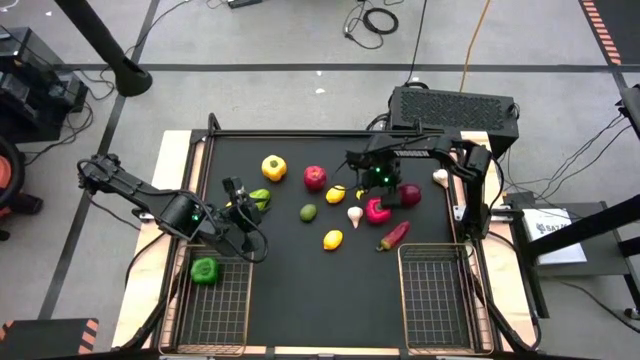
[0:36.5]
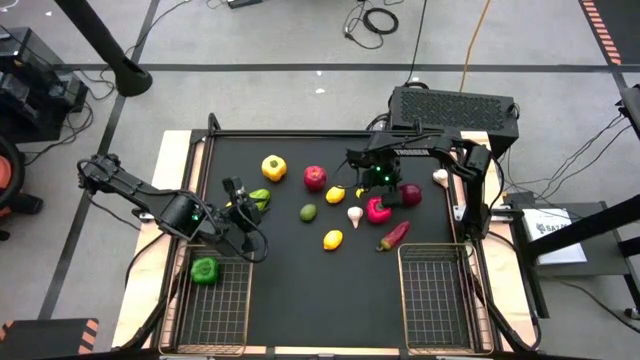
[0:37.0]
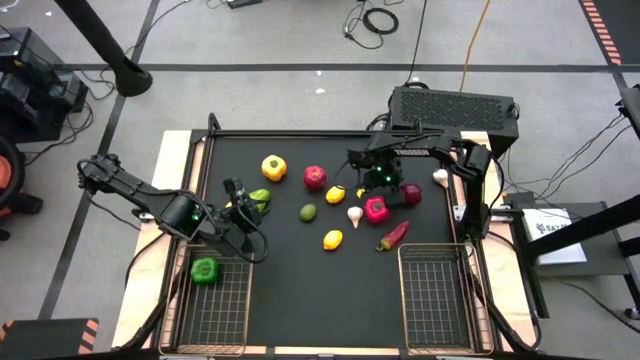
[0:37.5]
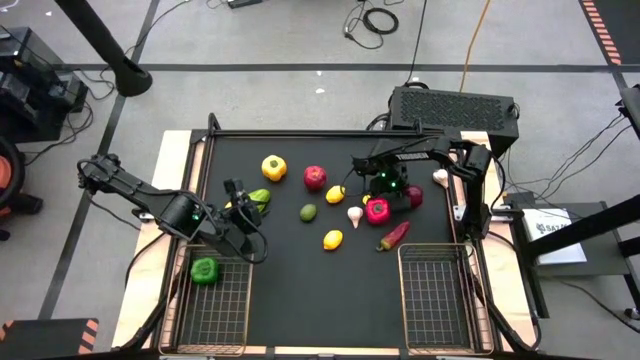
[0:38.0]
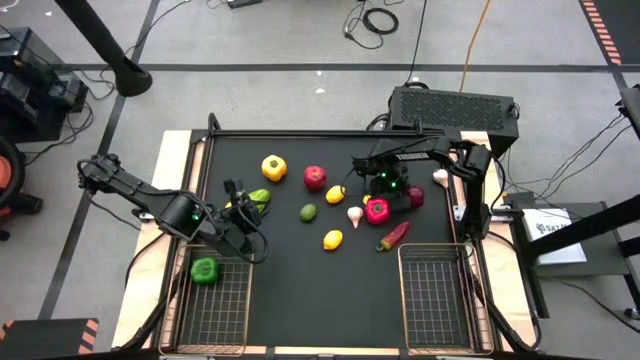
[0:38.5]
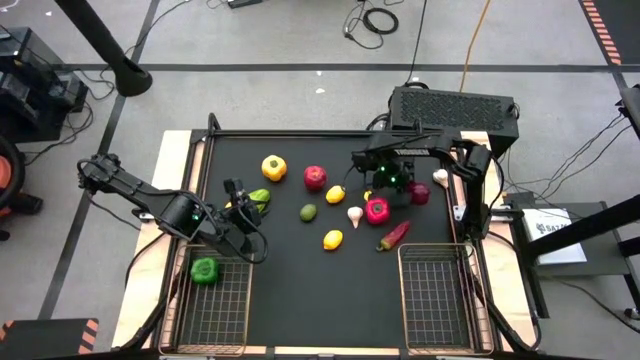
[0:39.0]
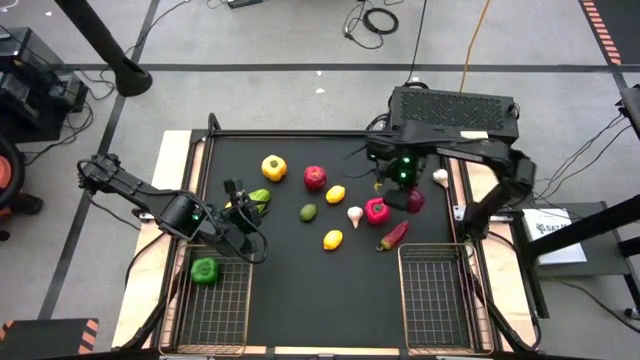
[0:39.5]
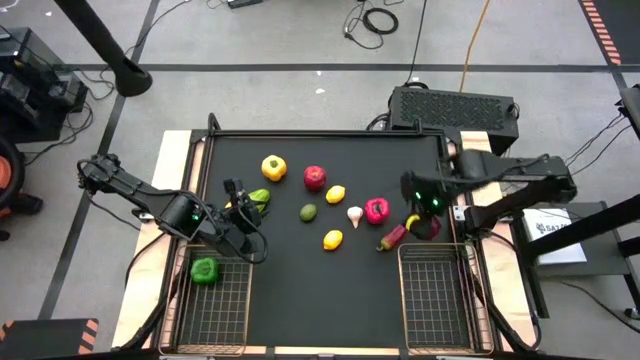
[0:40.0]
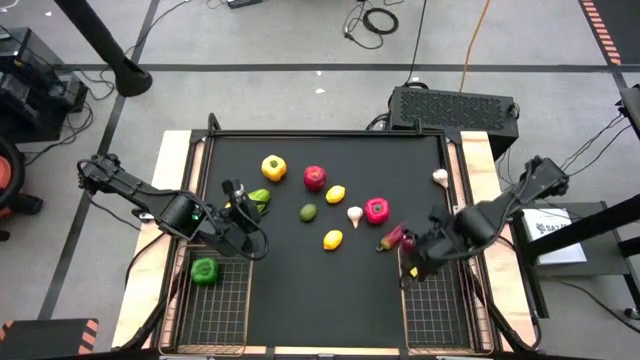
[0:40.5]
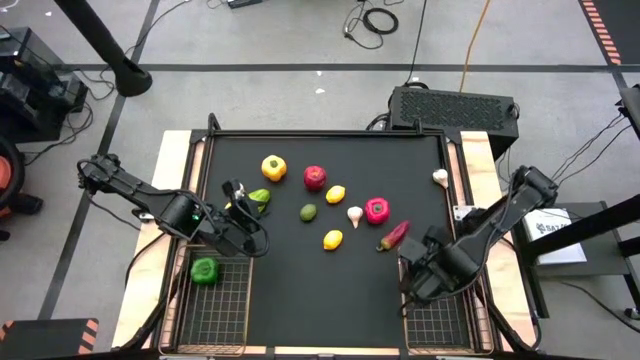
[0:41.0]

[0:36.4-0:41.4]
Task: Sort produce into baskets
Put the right apple into the right gold wire basket

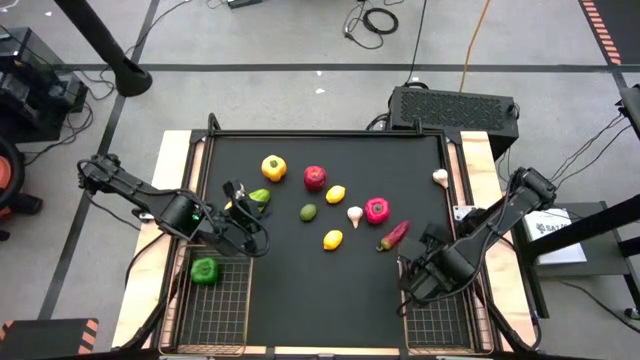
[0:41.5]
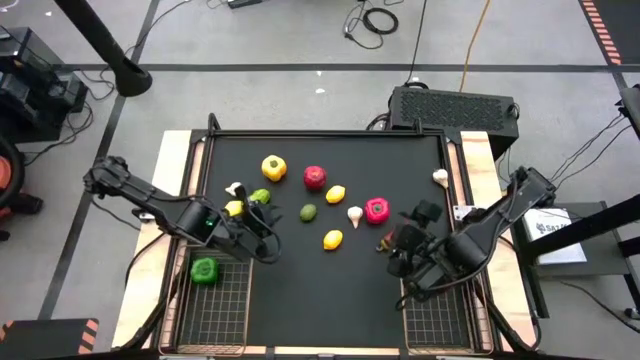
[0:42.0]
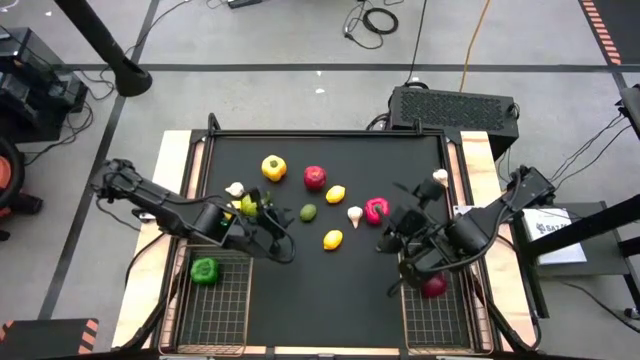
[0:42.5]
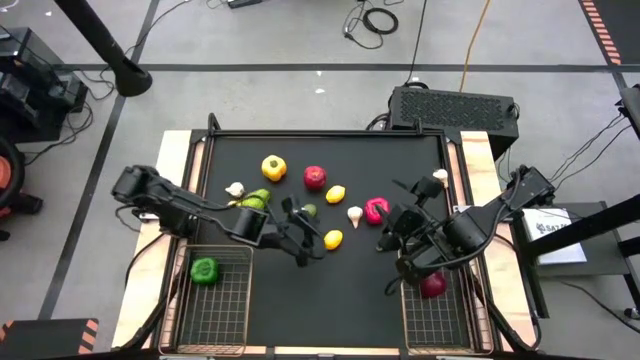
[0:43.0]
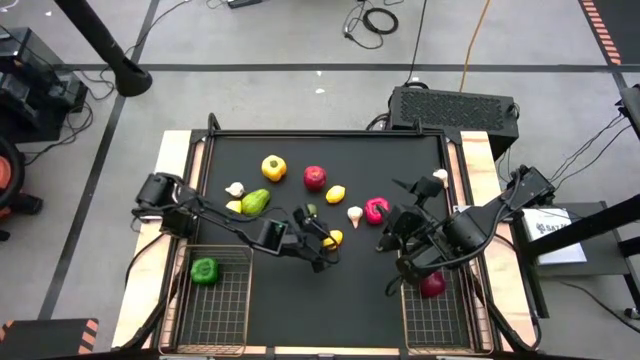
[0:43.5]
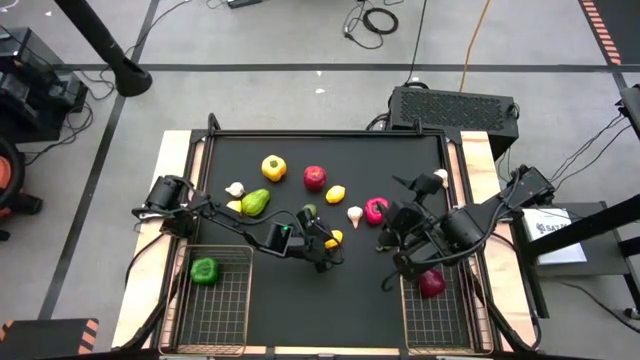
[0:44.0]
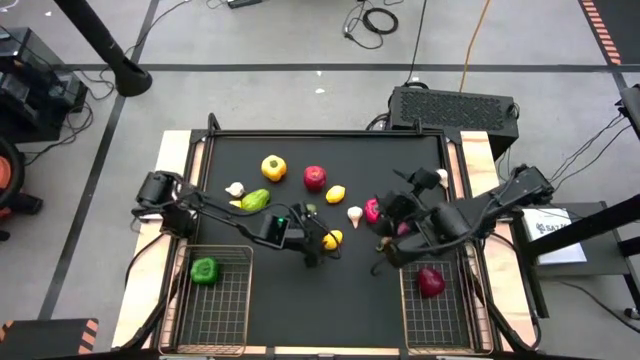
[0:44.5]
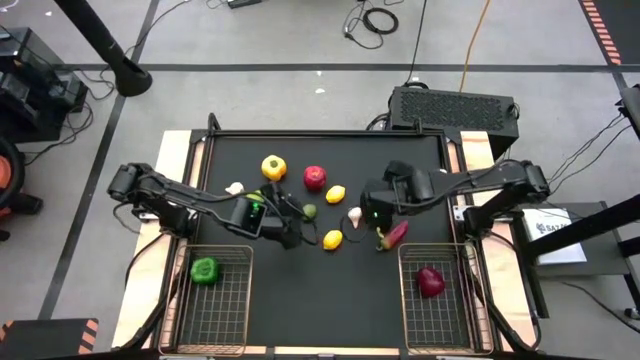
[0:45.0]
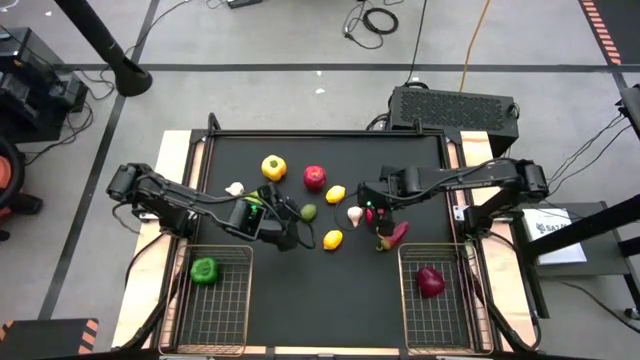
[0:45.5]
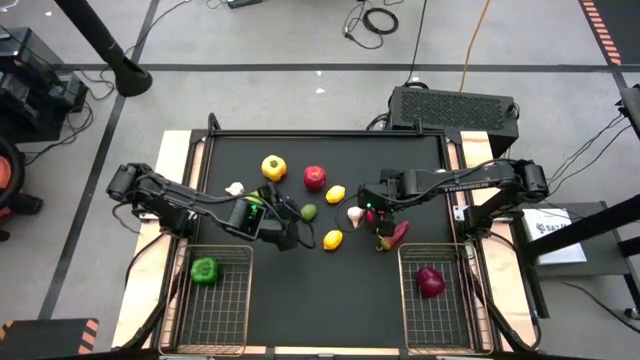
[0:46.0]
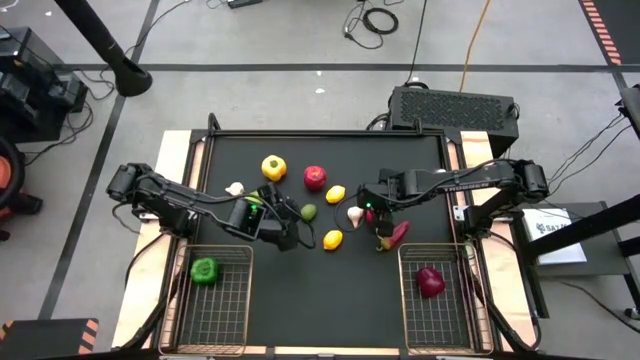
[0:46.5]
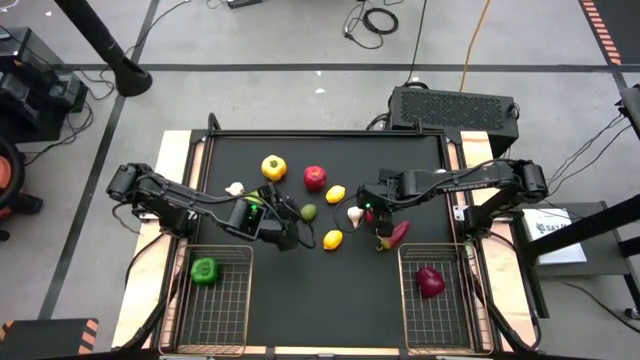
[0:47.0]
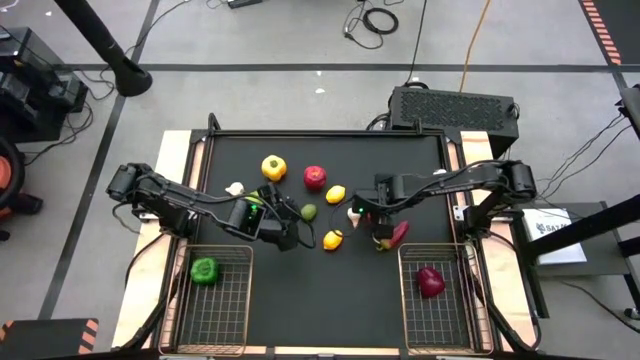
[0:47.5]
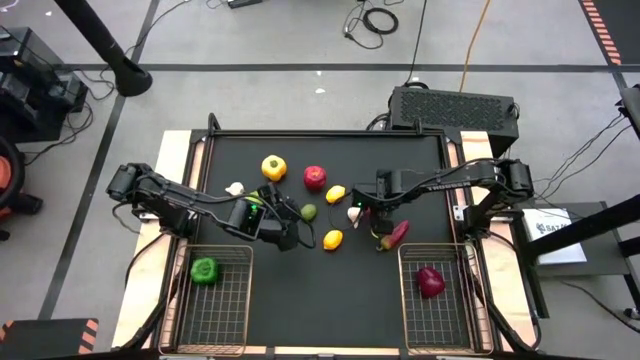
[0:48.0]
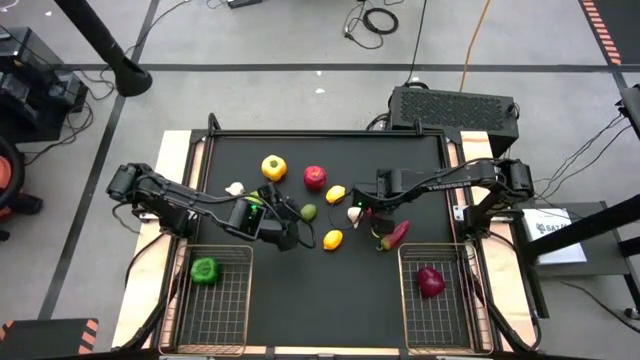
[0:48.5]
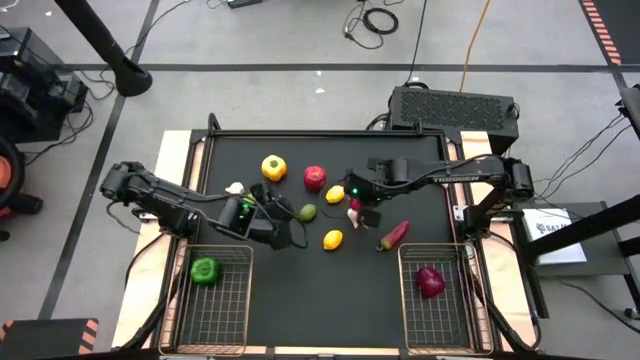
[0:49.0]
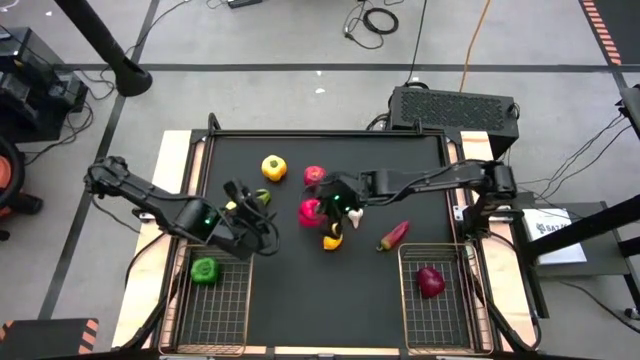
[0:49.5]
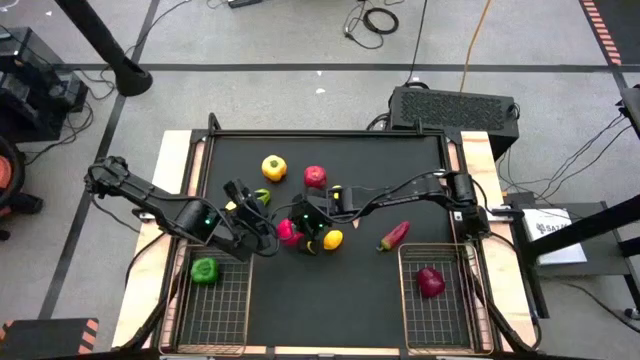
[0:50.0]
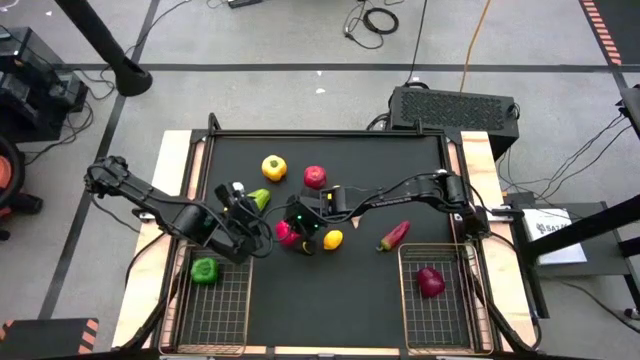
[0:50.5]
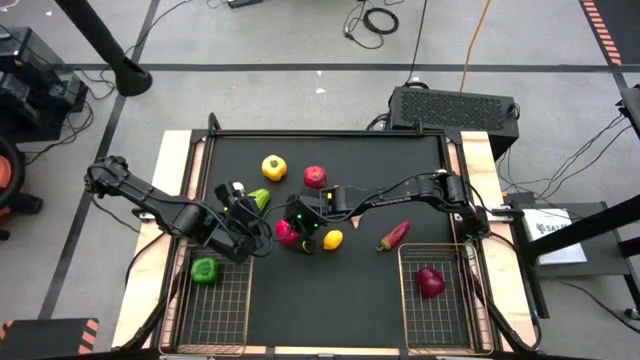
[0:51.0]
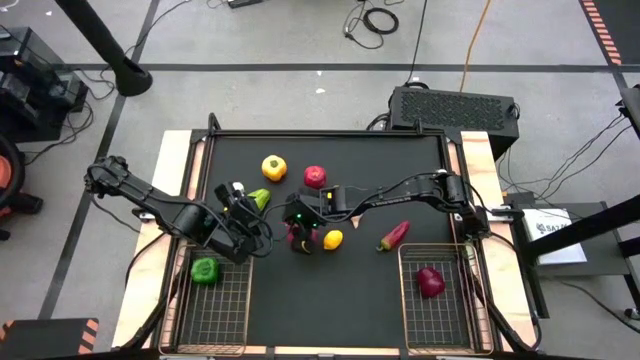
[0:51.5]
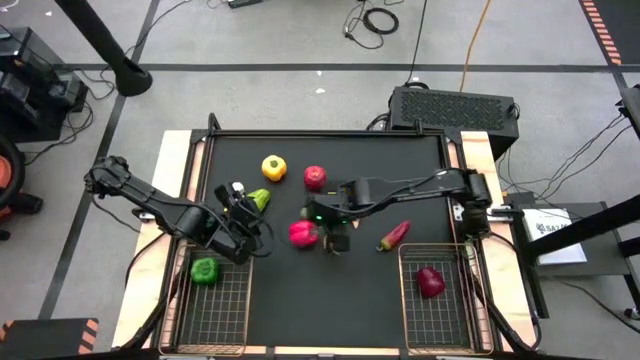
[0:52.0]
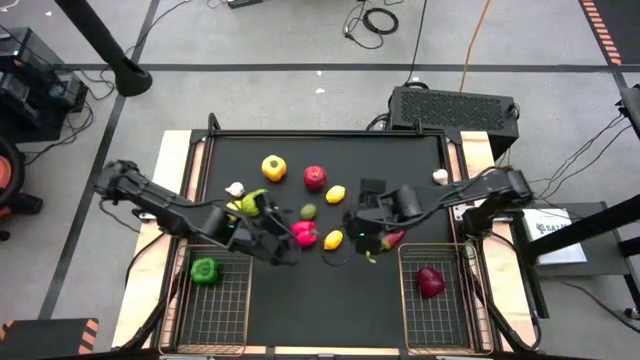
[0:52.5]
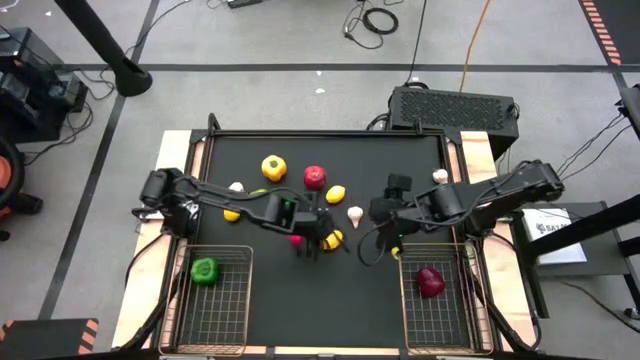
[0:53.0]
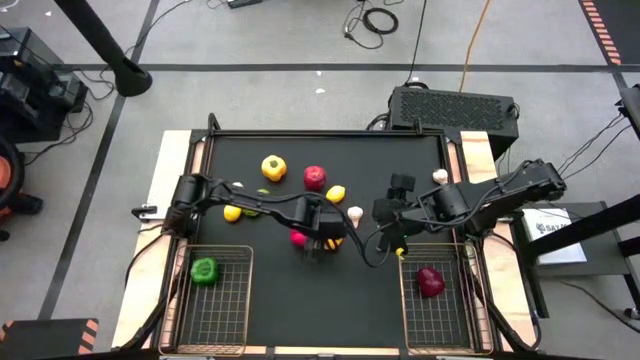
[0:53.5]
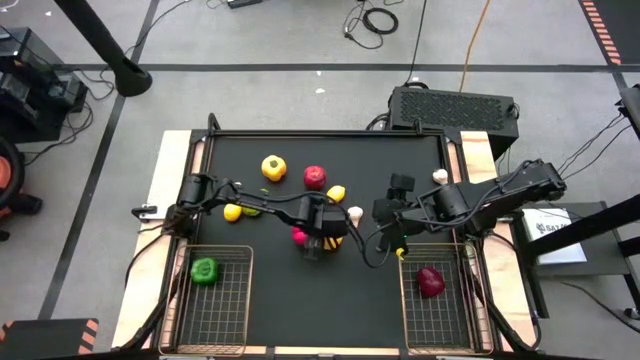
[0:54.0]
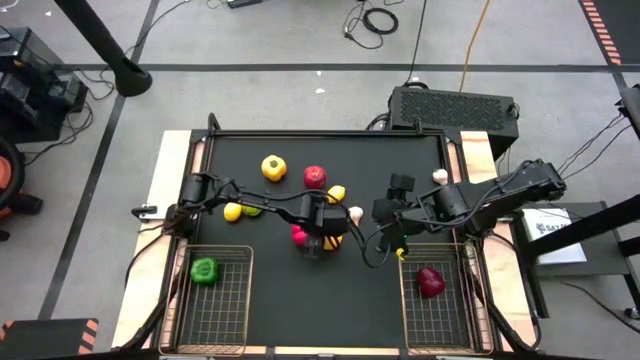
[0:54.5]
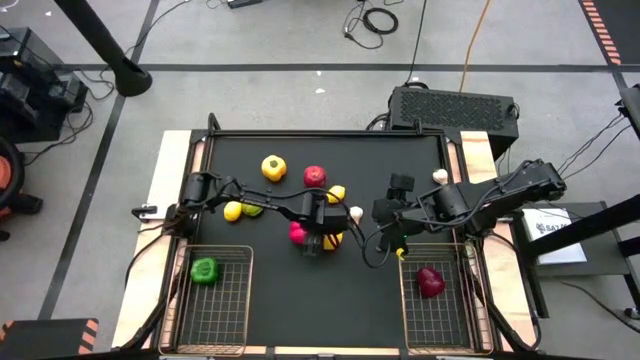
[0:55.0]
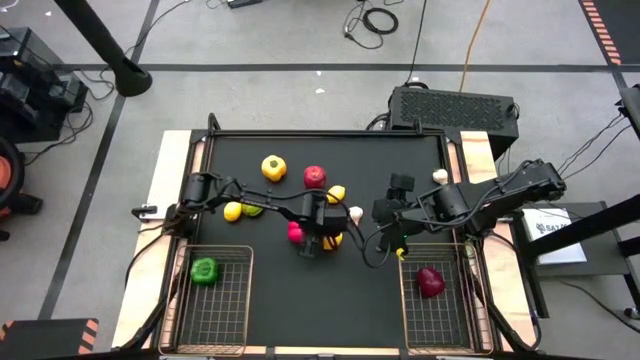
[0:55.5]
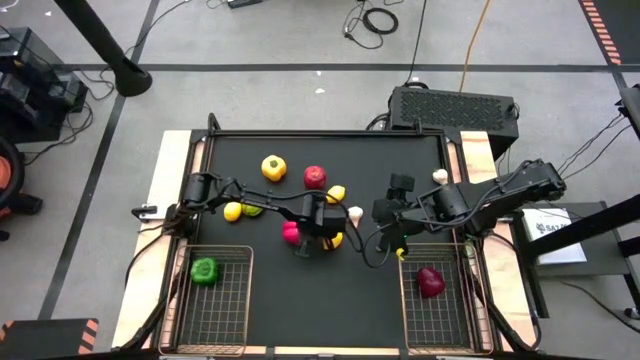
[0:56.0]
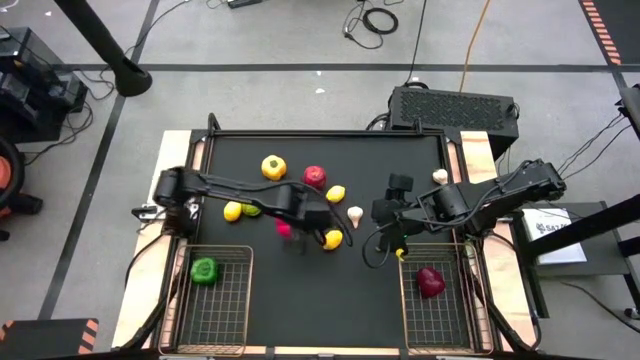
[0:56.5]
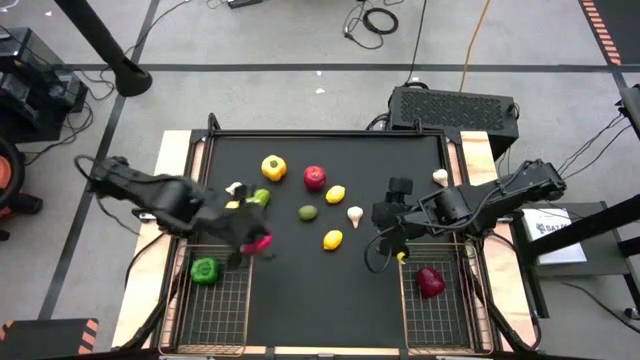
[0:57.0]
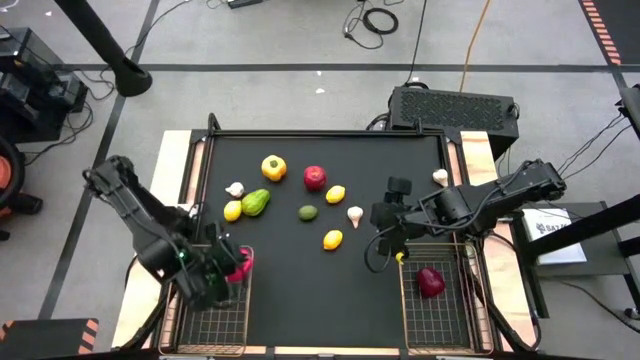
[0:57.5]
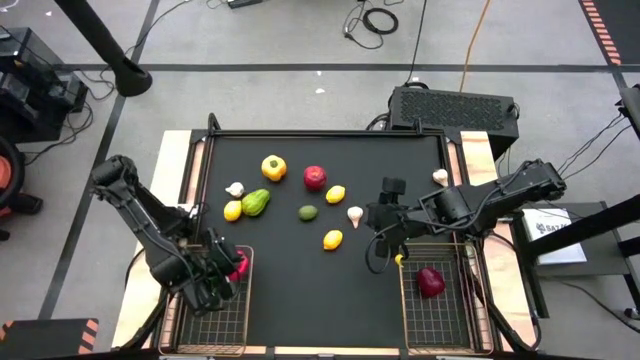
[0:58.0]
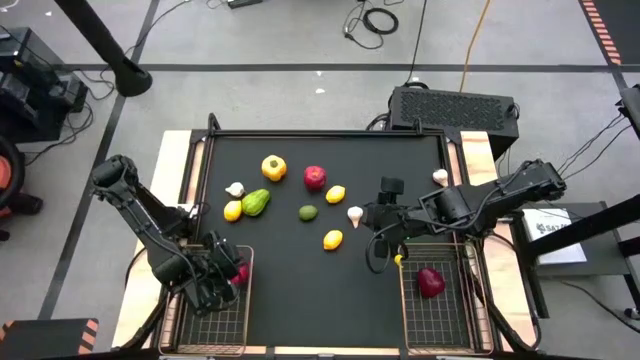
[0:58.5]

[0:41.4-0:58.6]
Put the red bell pepper into the left gold wire basket
